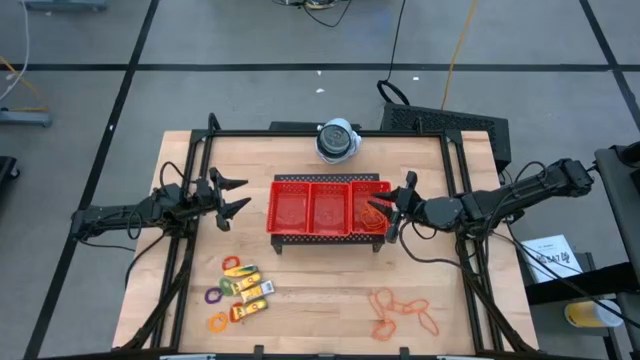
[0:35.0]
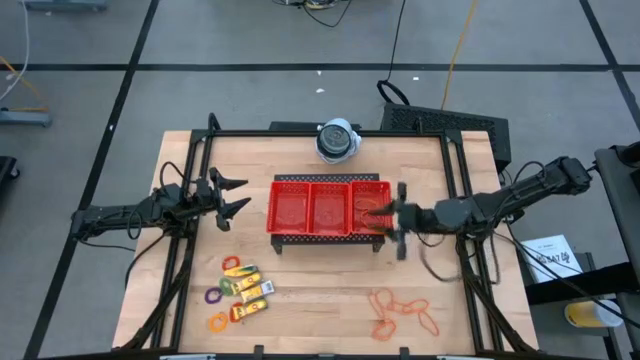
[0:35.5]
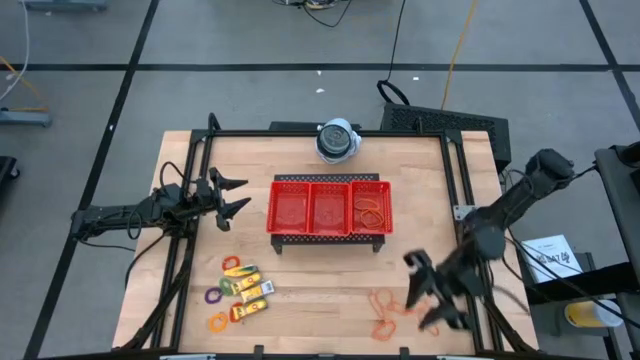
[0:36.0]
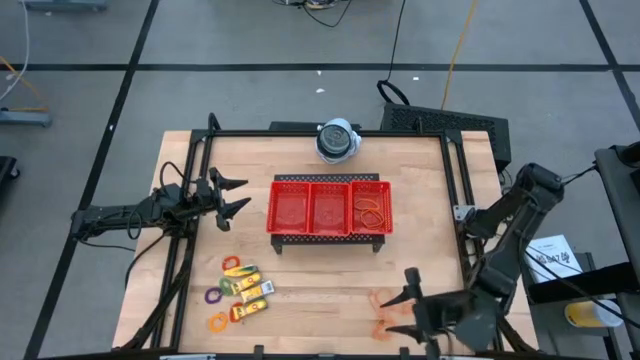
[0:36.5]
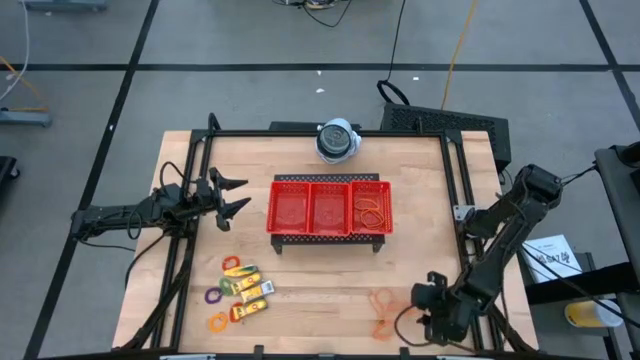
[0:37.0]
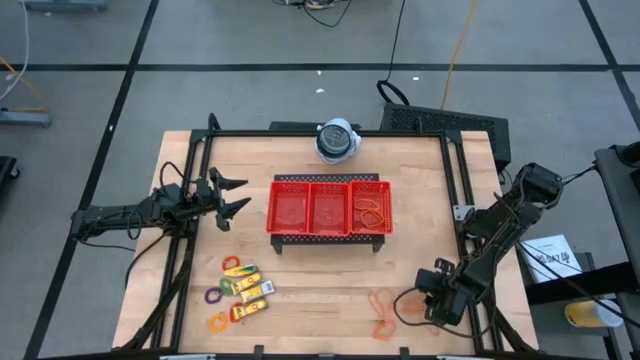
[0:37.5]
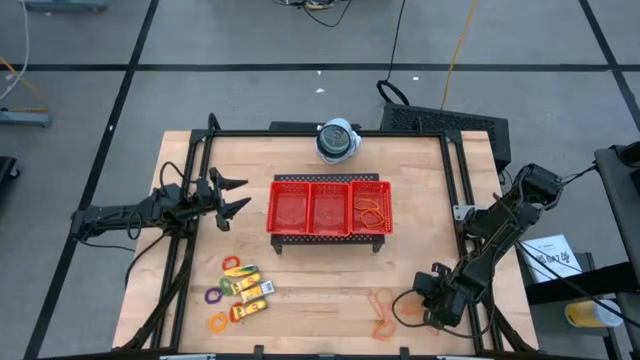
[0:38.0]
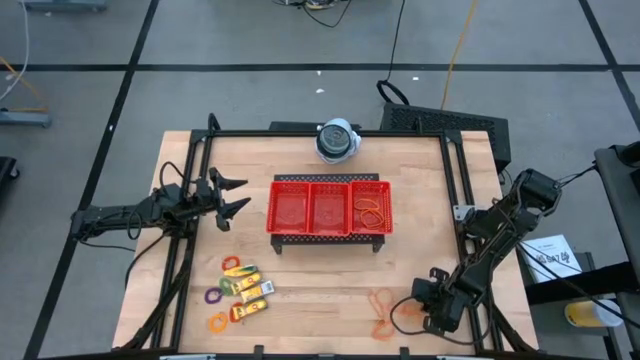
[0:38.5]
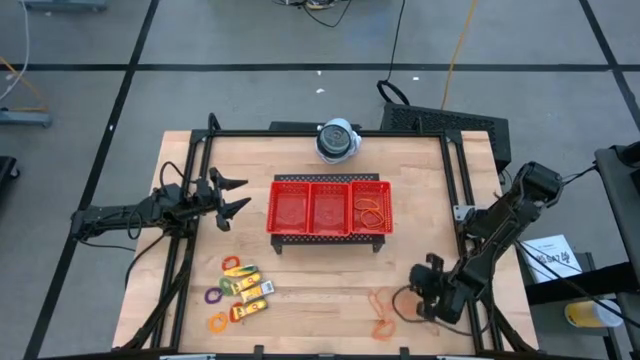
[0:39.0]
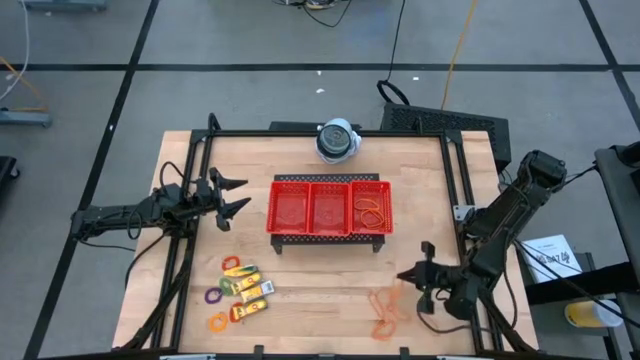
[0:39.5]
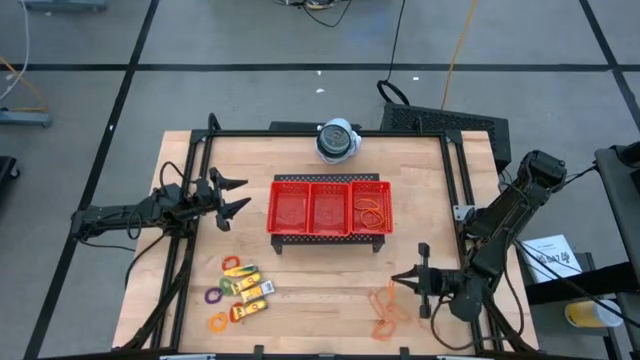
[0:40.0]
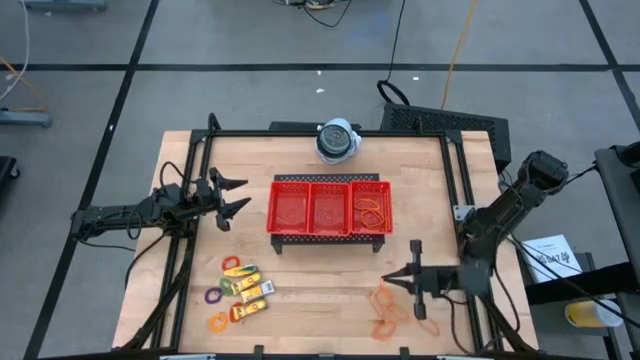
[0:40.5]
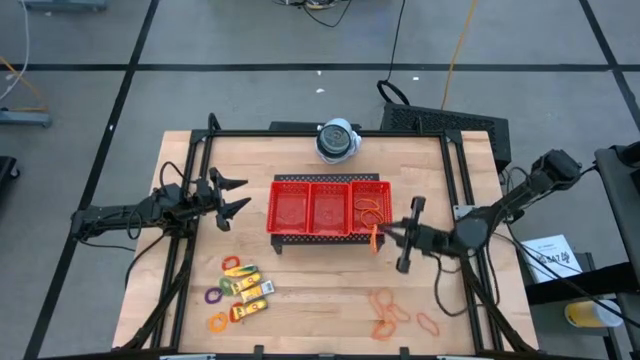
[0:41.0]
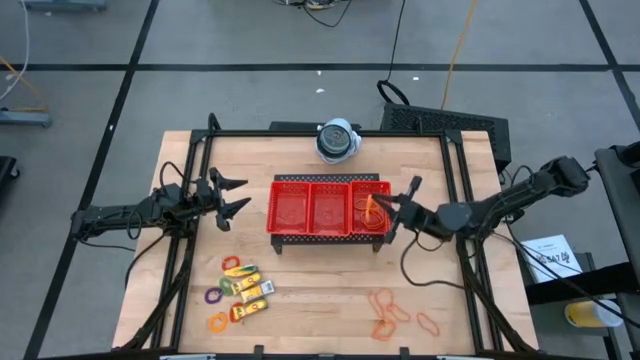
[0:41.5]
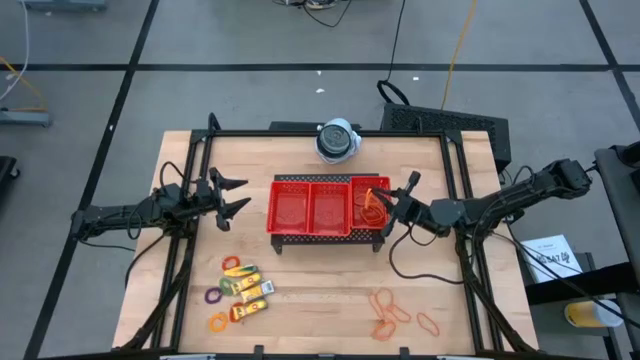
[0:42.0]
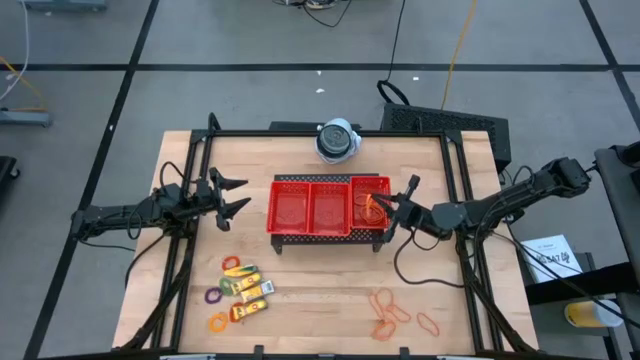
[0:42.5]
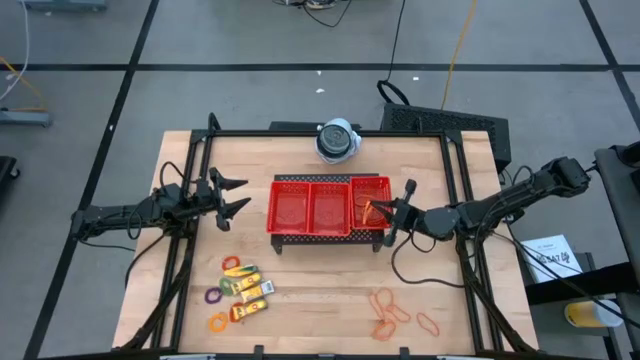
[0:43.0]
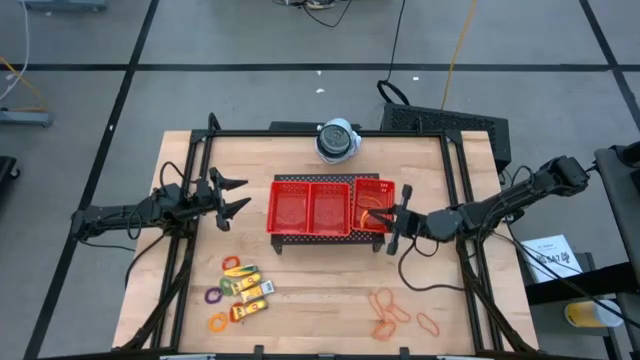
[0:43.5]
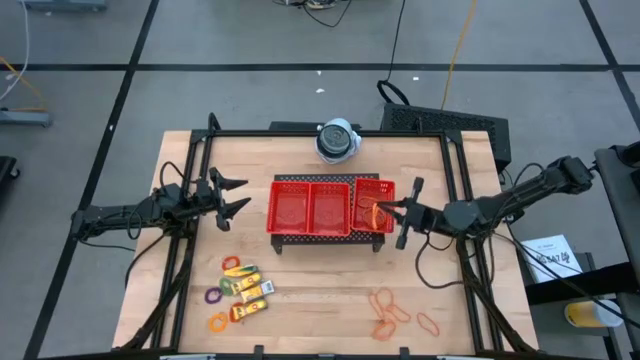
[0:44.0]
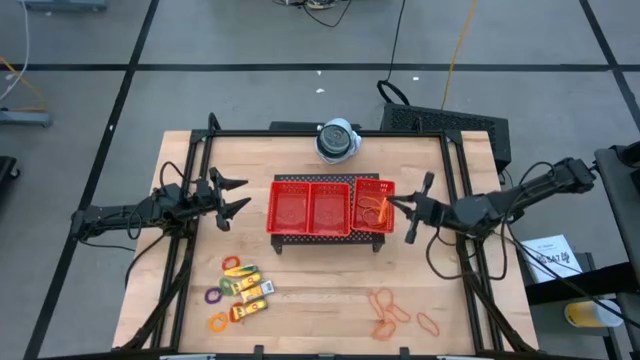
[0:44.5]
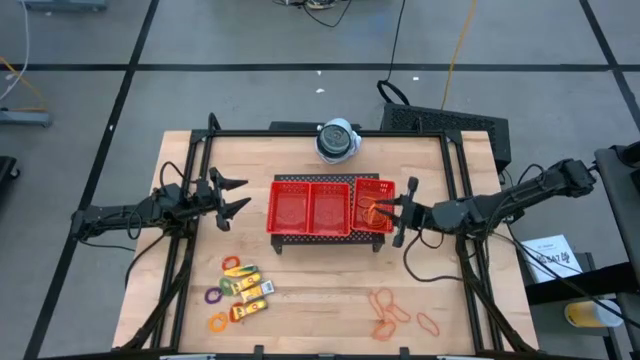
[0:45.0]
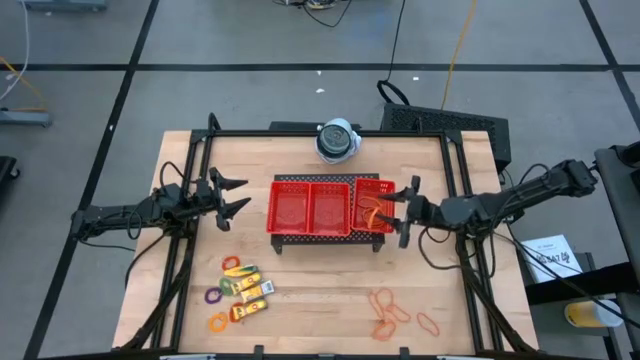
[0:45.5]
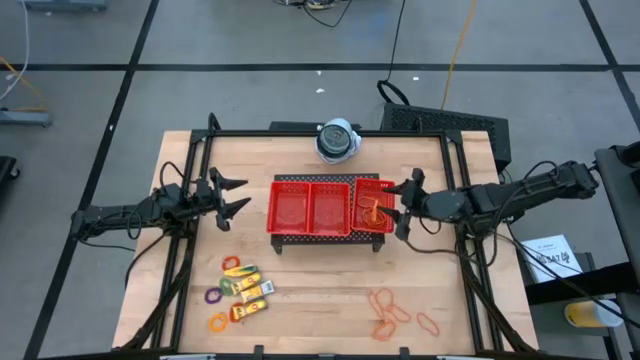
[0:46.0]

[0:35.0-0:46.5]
Task: Pick & Place Office Desk Supplies
Put the orange rubber band into the right red bin

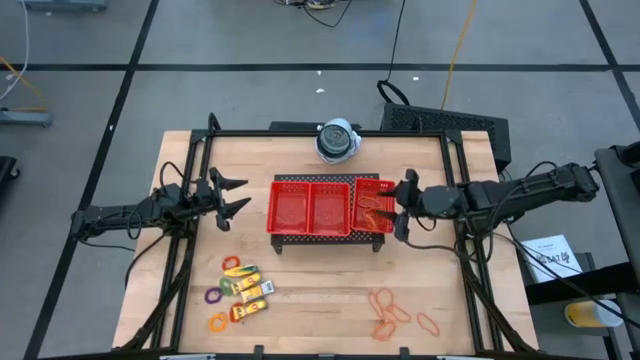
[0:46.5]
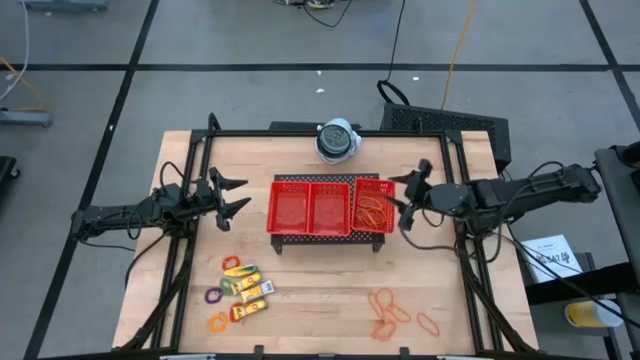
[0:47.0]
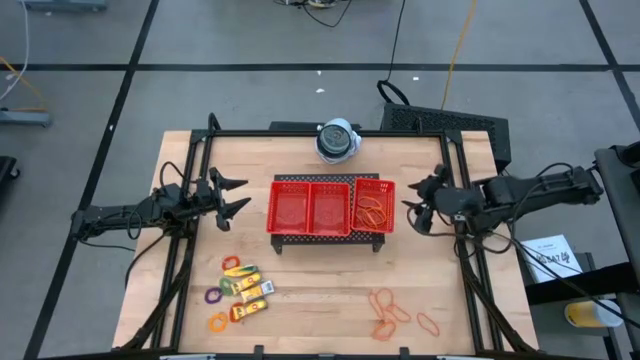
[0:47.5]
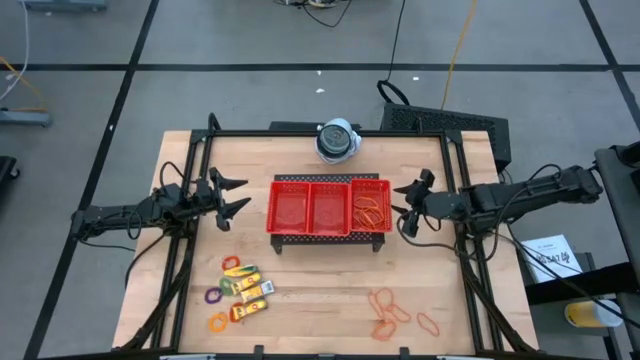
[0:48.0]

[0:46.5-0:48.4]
Adjust the right red bin on the shelf

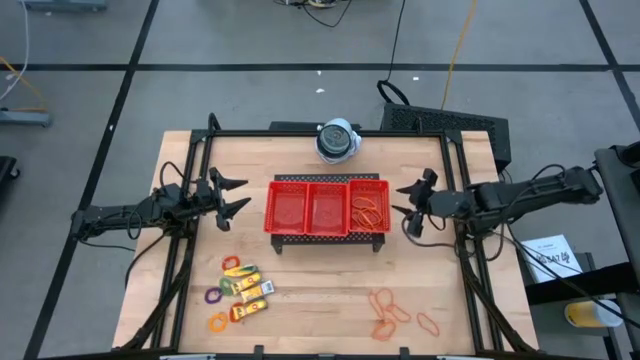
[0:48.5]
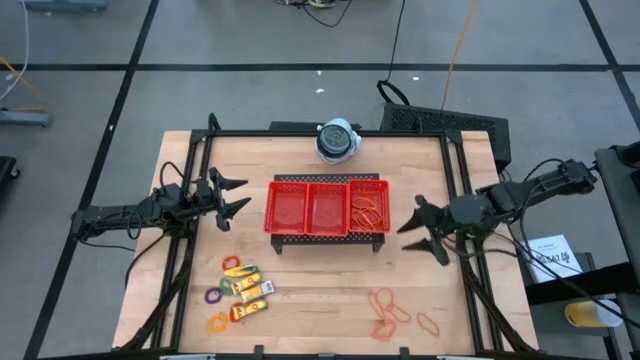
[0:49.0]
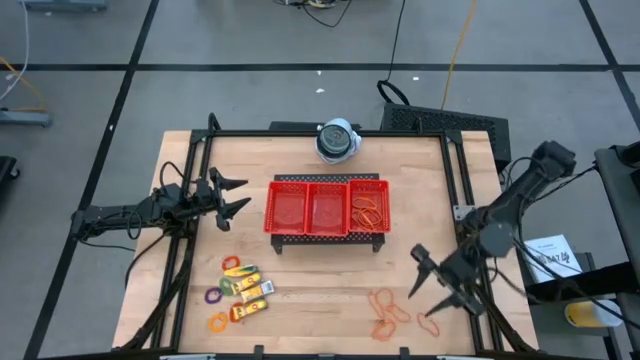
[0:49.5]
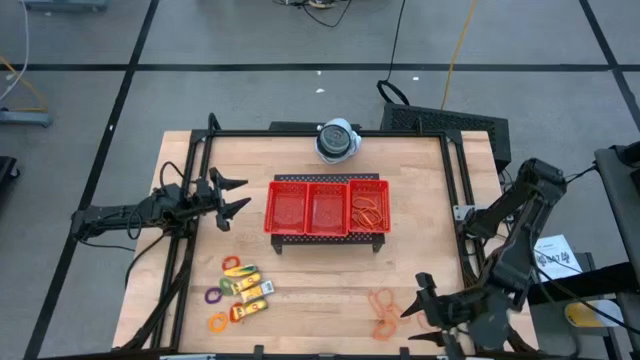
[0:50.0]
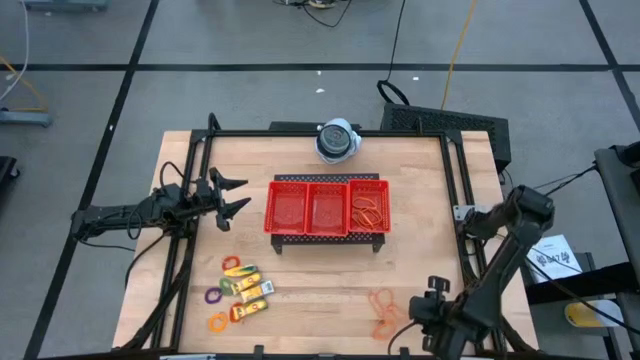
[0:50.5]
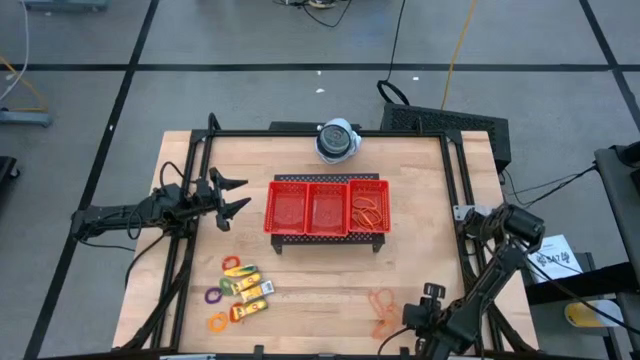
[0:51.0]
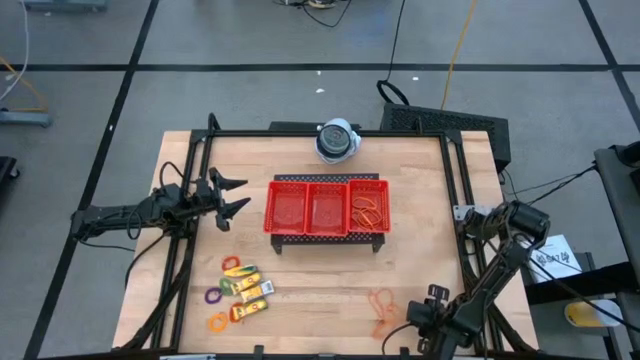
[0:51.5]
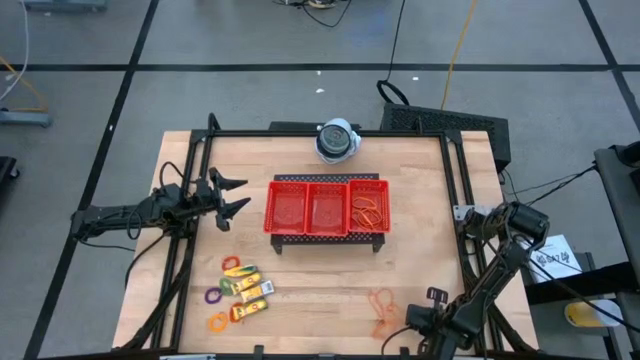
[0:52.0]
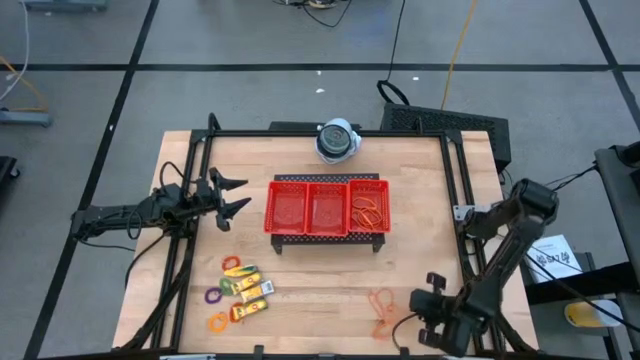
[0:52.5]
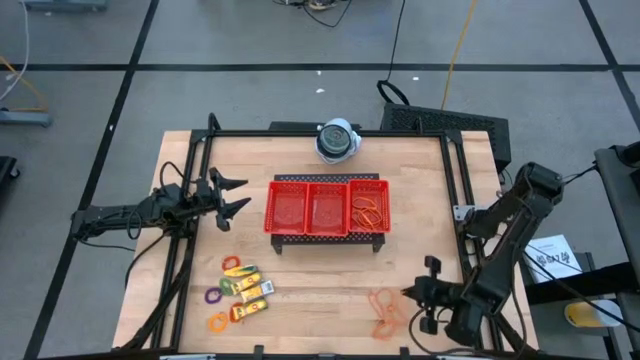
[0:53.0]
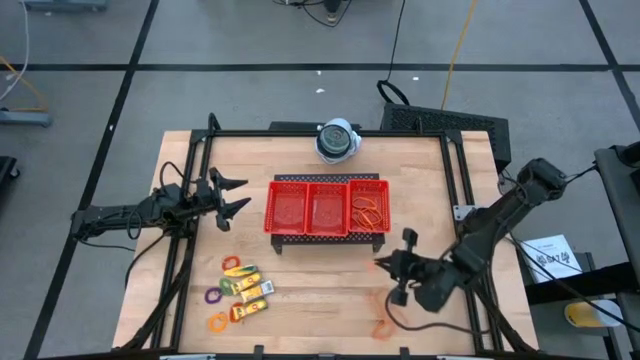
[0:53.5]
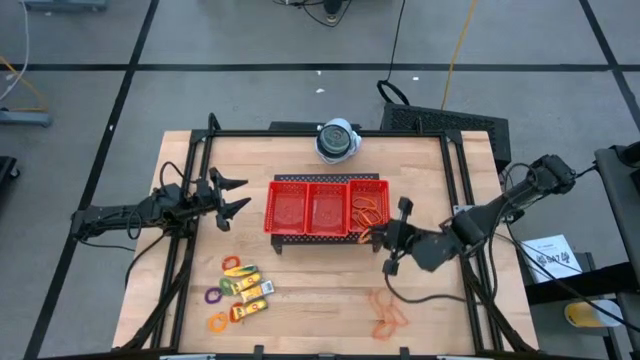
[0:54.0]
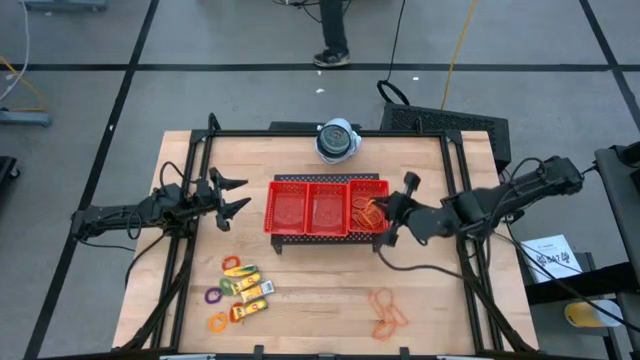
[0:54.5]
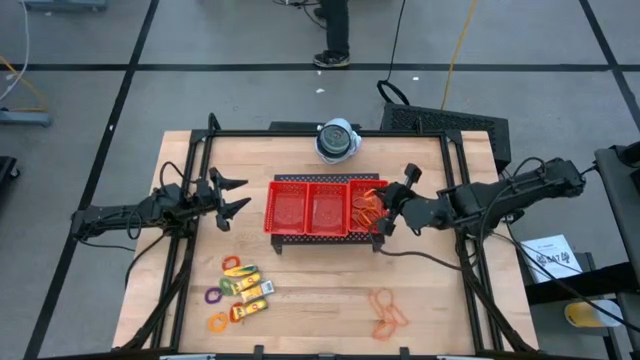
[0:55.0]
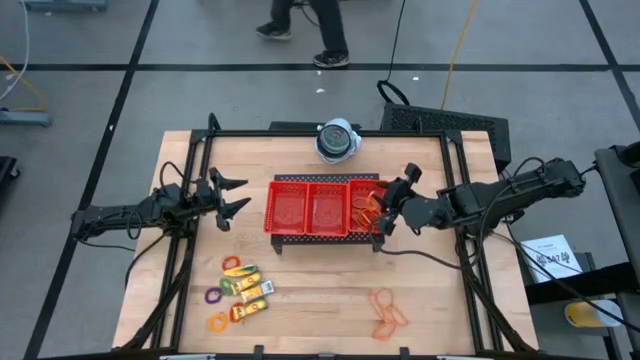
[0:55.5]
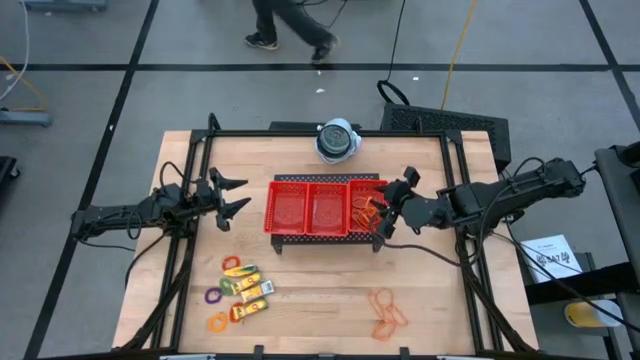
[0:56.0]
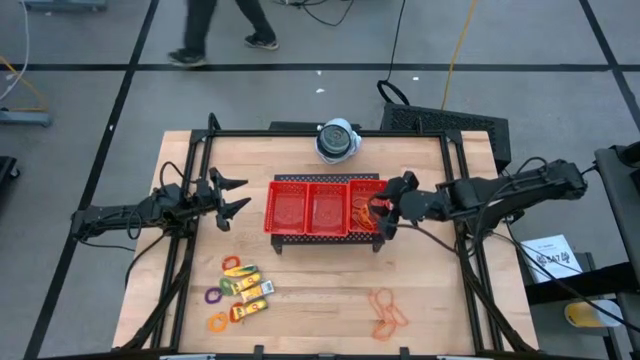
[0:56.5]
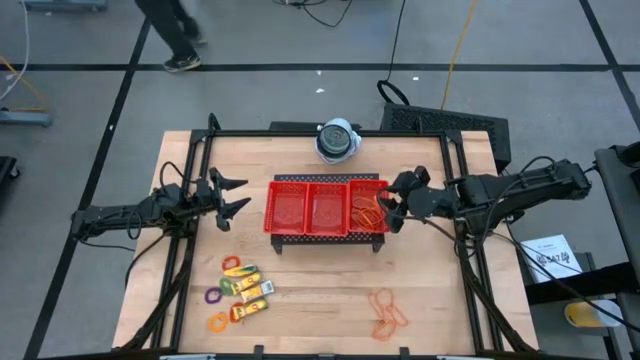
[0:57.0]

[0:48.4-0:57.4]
Put the orange rubber band into the right red bin
